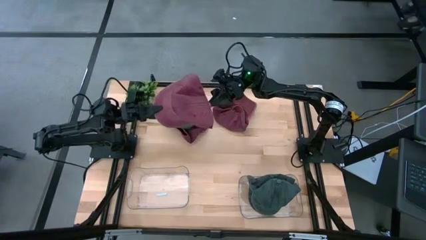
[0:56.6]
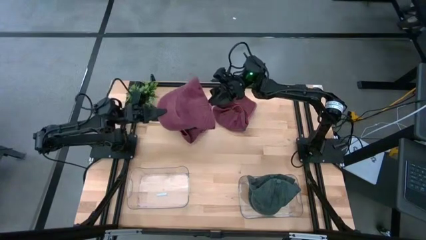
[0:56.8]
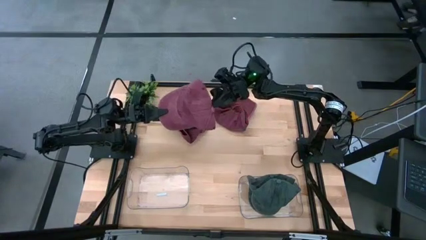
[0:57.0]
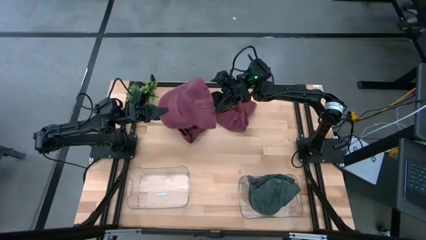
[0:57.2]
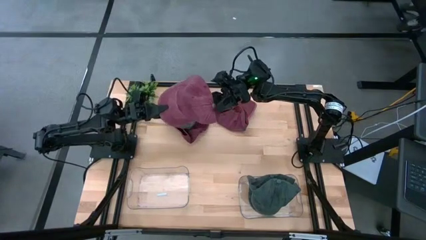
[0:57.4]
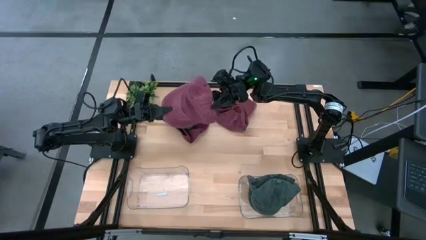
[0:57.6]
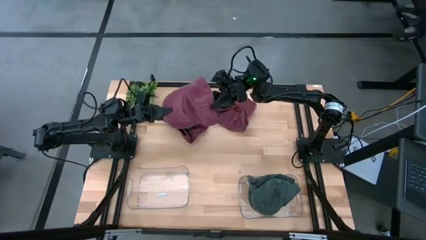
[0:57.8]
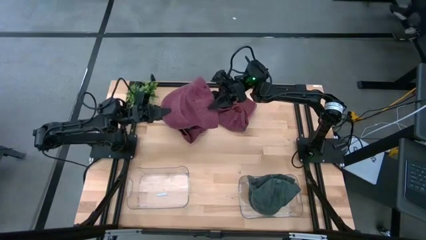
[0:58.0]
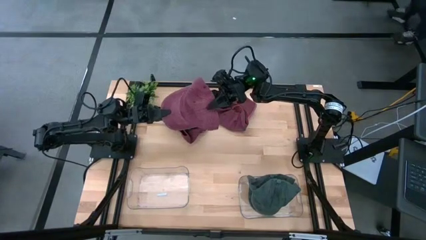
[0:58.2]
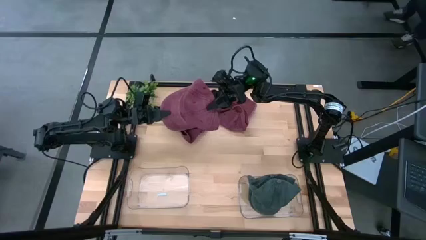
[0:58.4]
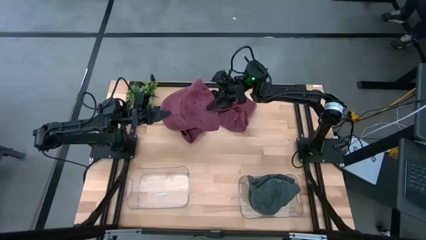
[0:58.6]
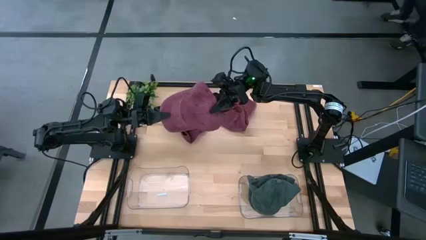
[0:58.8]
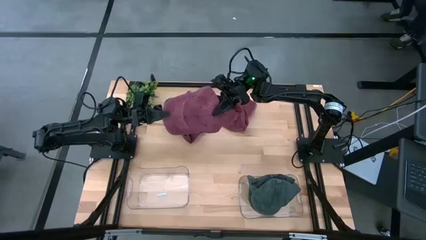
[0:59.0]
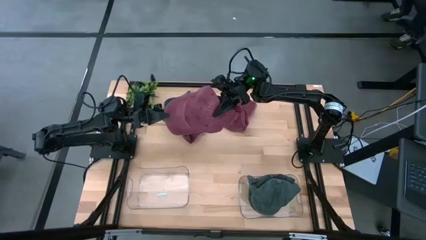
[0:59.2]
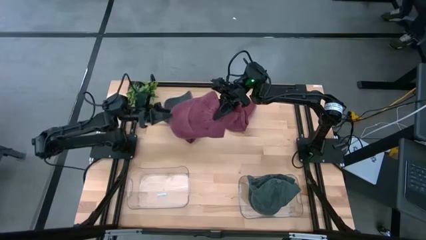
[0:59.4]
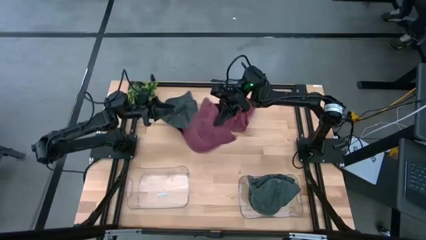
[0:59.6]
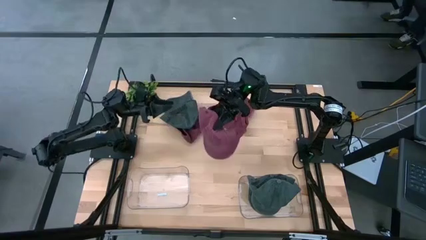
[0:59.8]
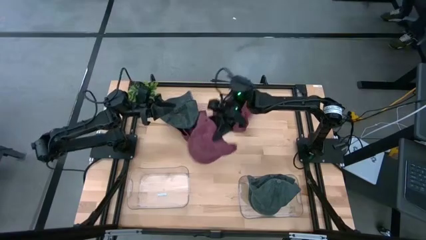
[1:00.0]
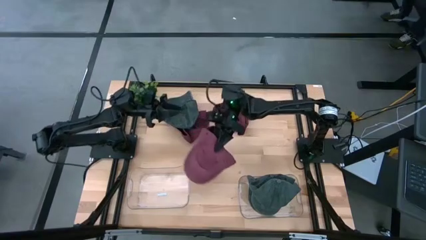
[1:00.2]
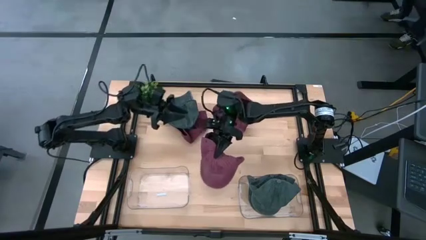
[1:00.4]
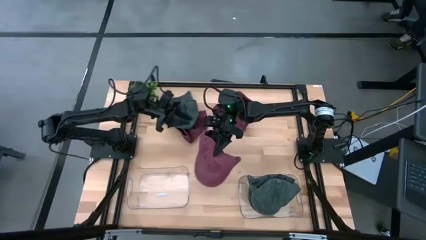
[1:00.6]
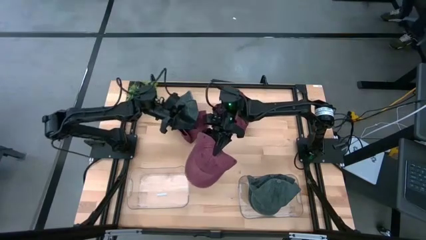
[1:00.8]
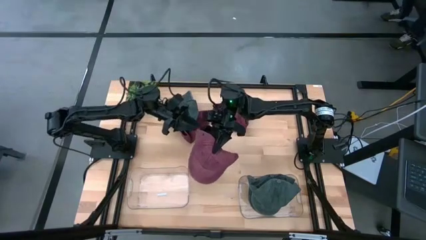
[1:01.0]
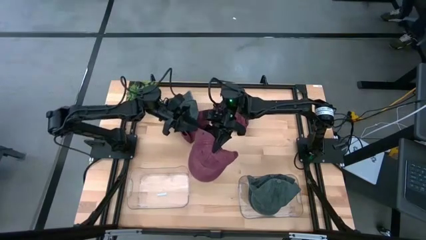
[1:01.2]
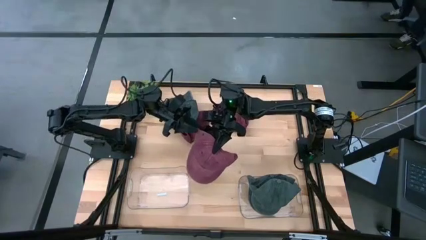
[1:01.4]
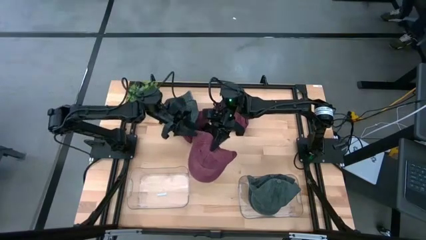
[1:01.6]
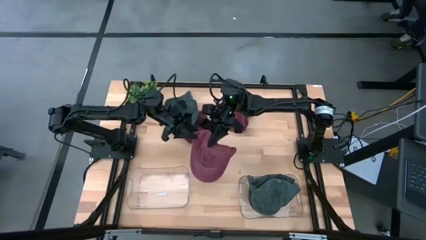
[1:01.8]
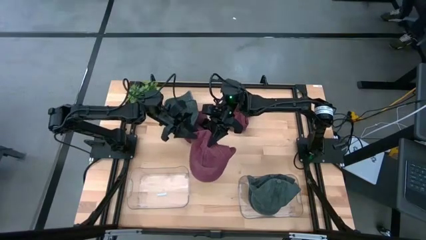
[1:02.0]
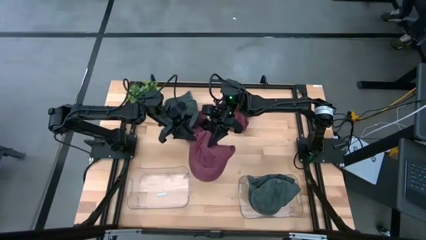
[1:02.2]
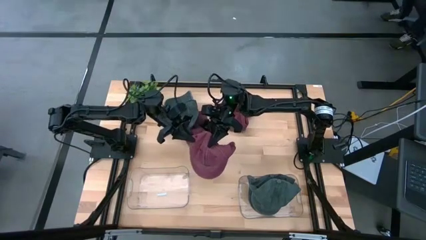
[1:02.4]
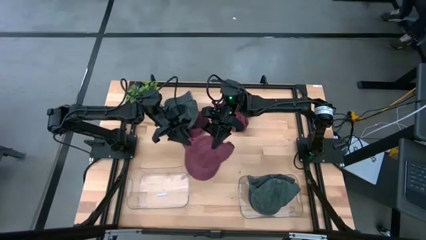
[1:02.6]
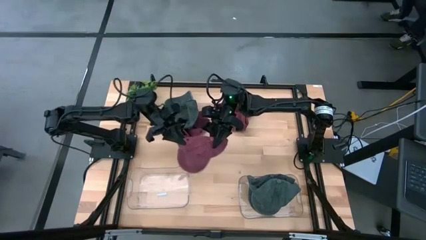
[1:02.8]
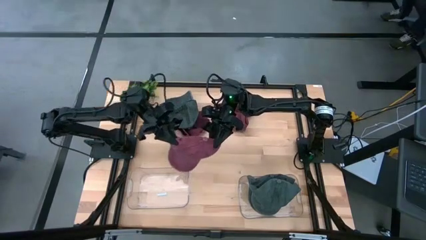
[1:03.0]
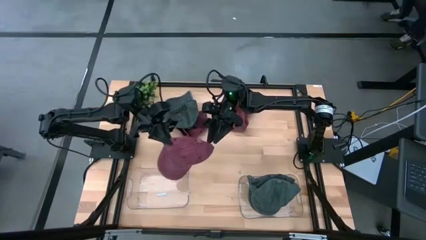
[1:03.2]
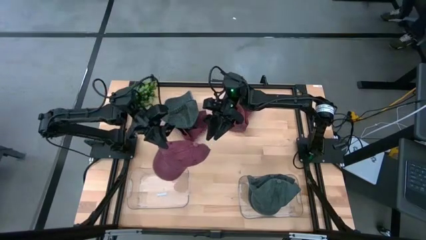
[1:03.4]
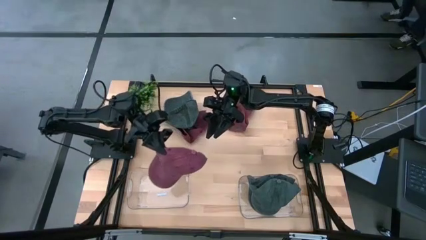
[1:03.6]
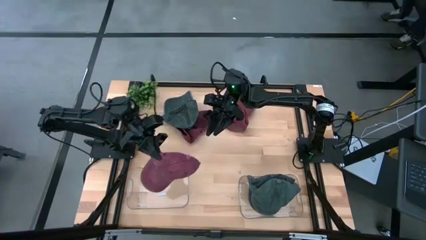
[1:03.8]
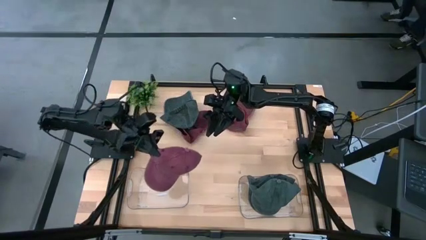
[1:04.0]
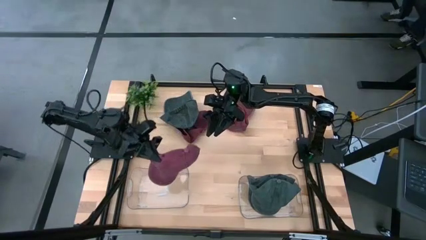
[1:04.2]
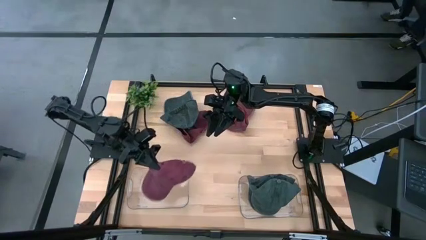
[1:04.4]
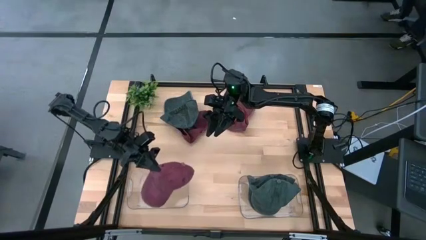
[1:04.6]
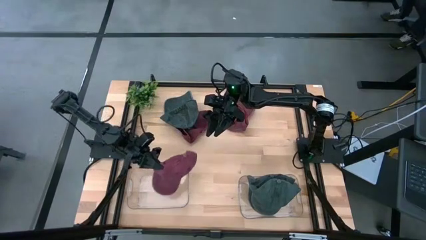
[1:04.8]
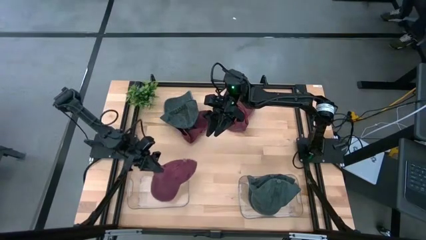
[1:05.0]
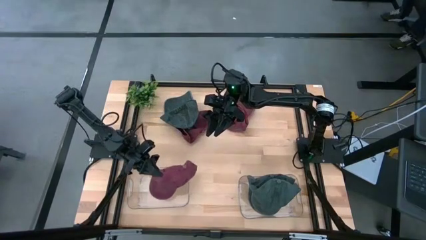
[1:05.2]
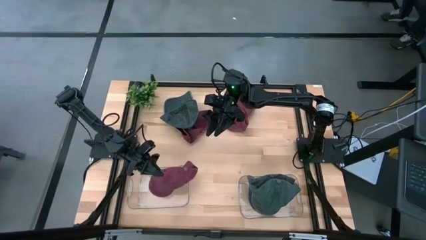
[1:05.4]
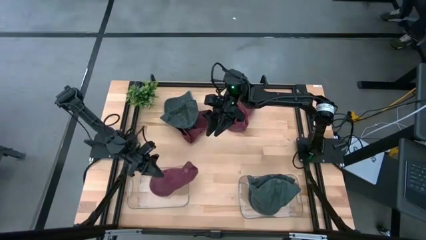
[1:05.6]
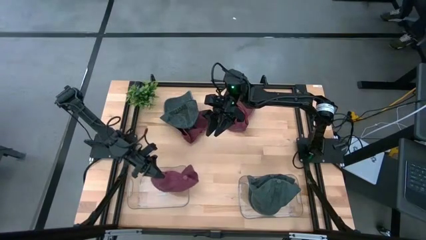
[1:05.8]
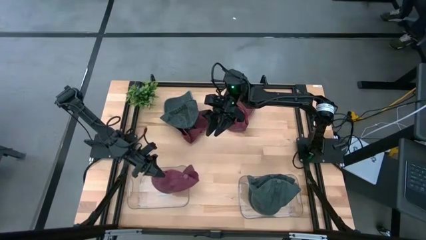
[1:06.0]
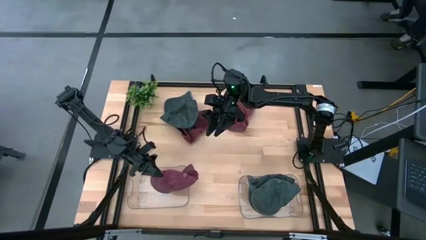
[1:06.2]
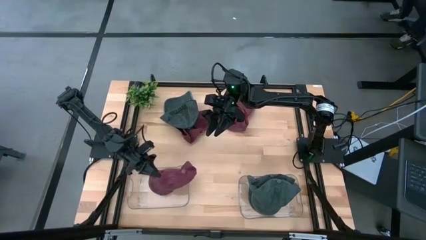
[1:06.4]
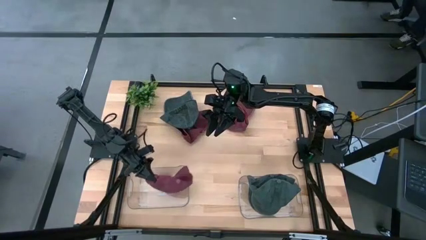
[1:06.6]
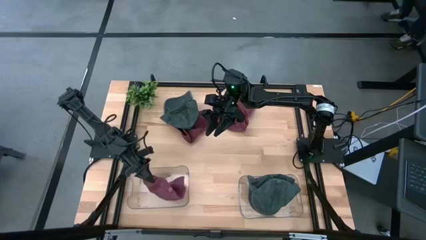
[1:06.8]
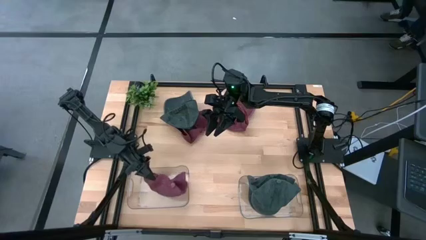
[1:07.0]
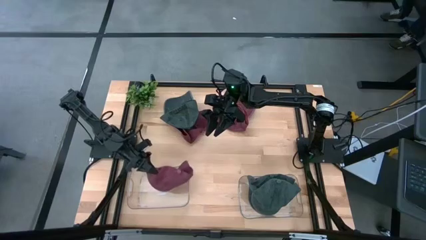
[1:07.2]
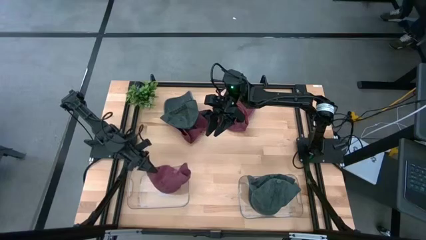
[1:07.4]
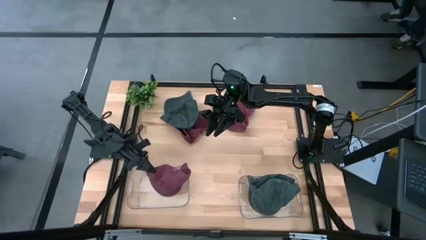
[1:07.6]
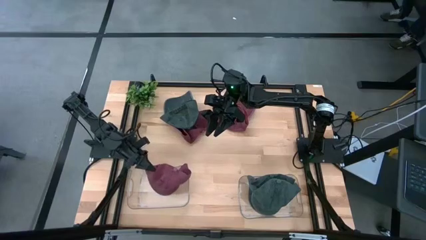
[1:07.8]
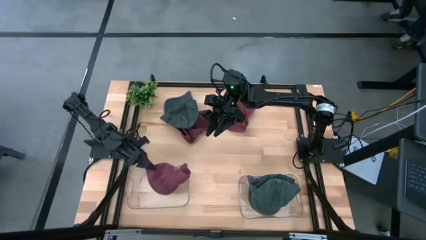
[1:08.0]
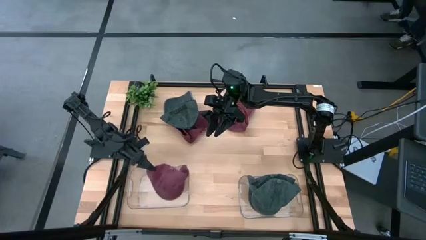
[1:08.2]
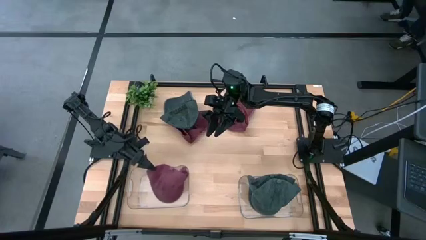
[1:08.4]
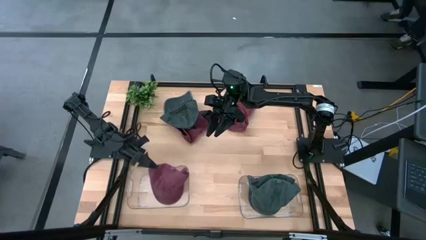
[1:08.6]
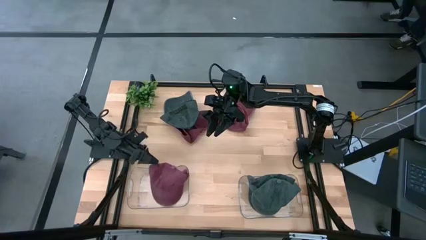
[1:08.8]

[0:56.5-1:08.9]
Task: Pick & Place hat
Put the bottom red cap into the left transparent bin

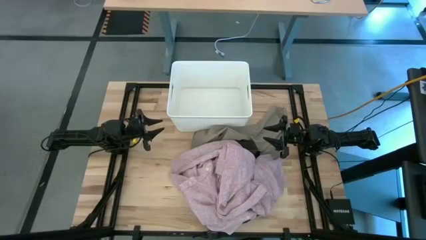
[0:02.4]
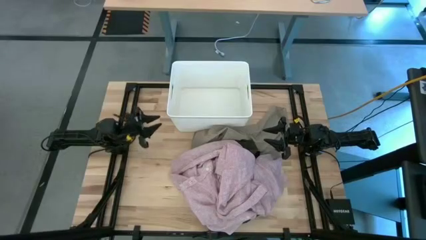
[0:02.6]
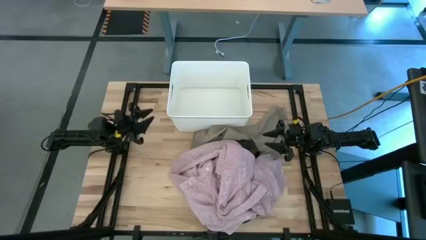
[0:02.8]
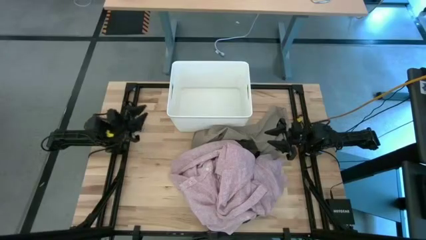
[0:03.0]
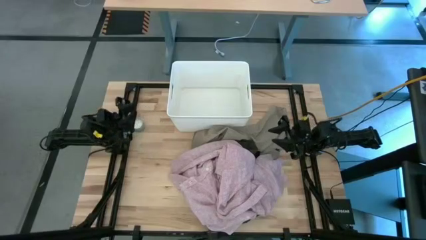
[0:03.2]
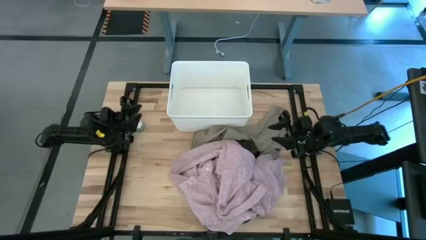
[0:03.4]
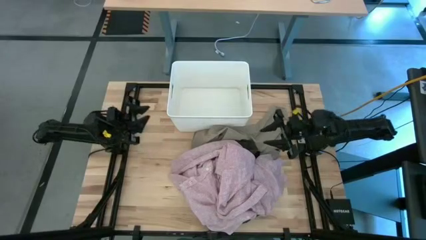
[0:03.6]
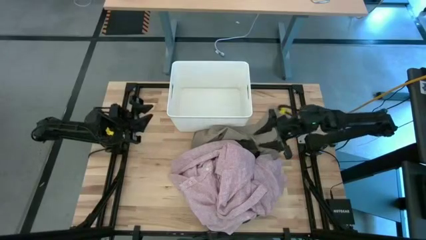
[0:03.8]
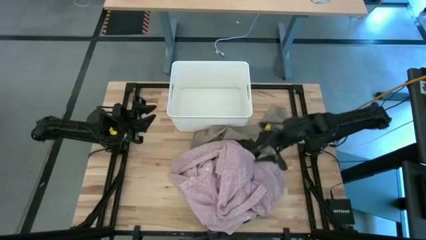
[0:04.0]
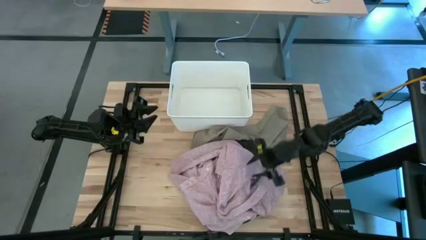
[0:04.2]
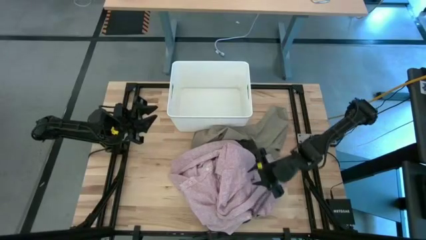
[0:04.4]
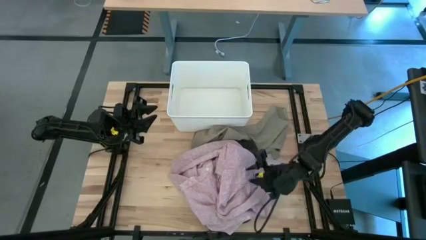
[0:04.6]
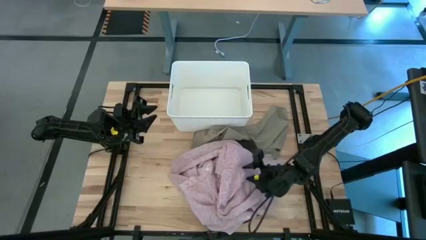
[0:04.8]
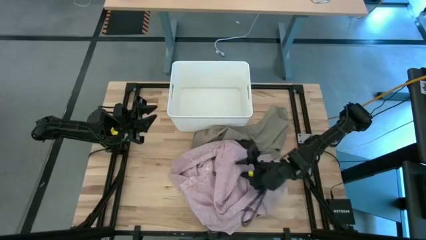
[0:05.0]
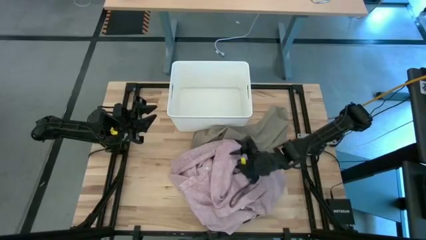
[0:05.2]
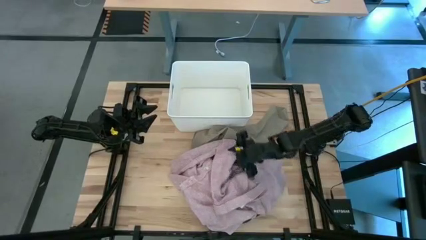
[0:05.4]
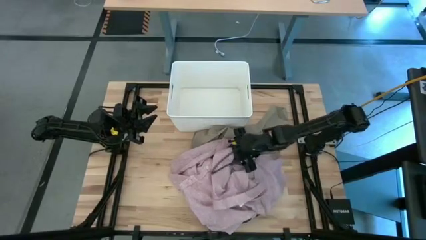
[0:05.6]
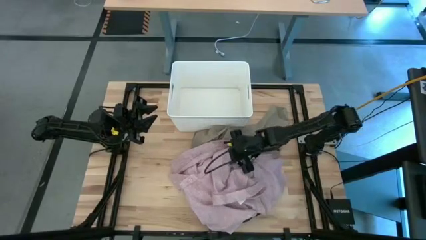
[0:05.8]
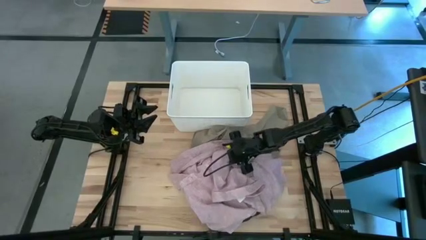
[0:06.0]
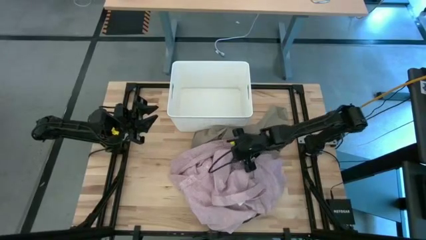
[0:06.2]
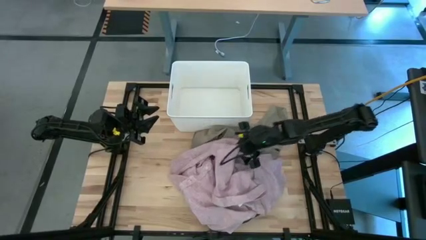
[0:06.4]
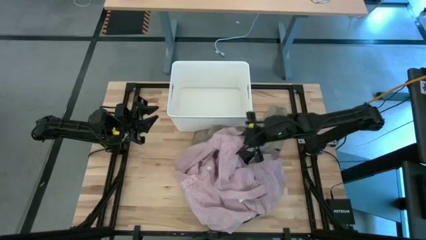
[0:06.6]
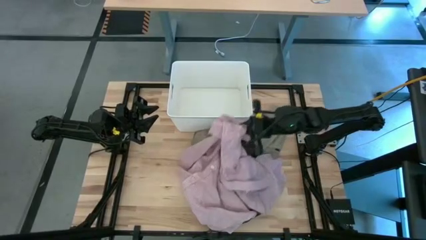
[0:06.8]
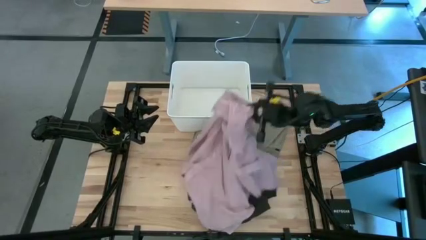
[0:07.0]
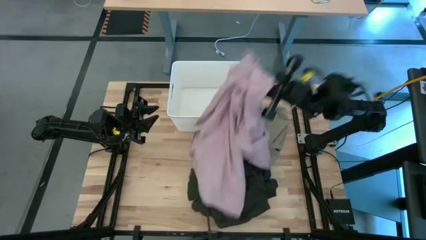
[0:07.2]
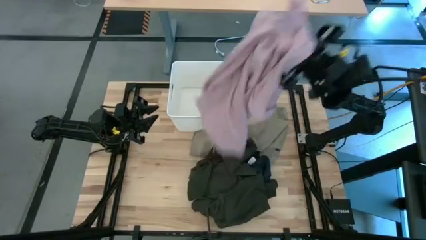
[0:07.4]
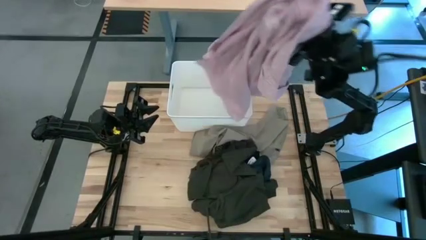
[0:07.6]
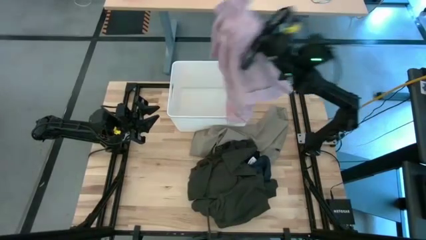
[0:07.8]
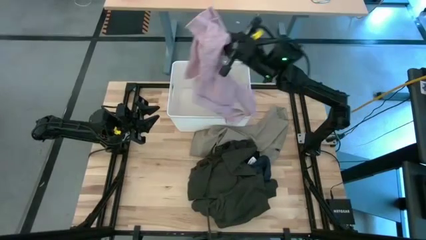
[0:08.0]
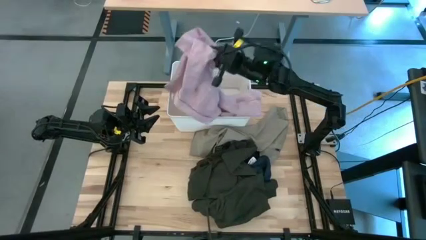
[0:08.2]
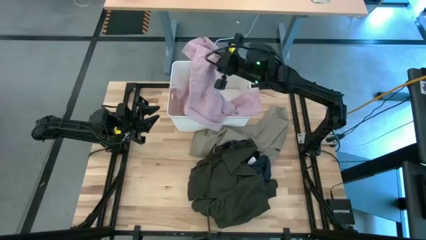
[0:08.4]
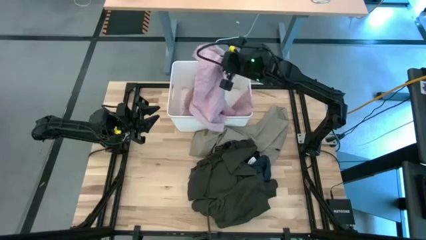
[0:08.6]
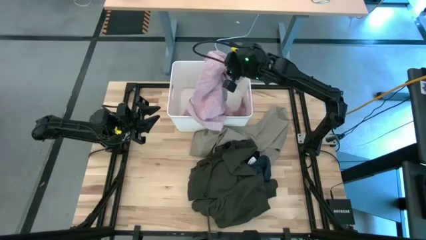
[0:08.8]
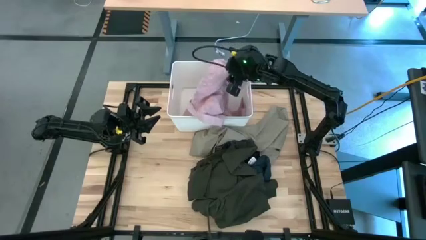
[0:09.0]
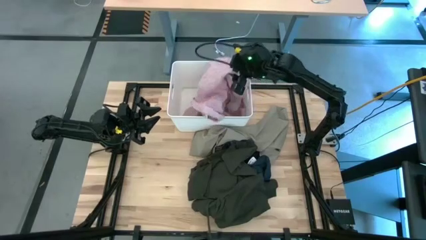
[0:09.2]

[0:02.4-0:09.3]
Task: Sort clothes
Put the pink polo shirt into the white bin
